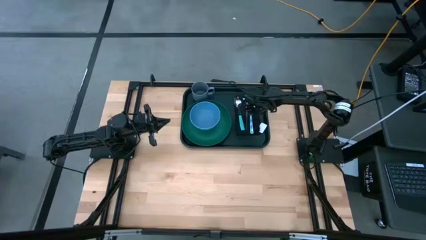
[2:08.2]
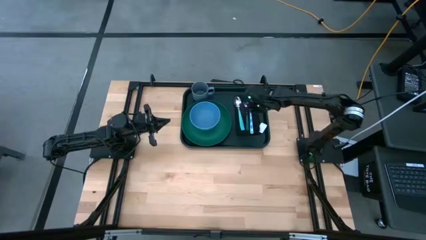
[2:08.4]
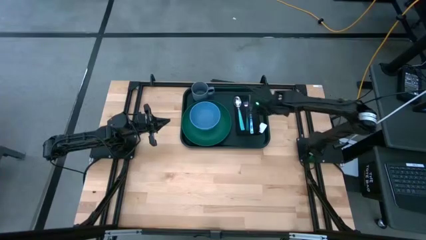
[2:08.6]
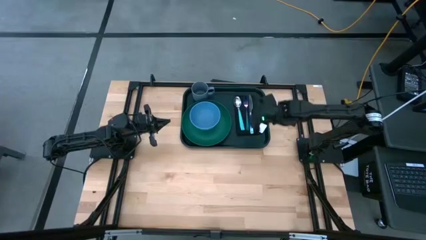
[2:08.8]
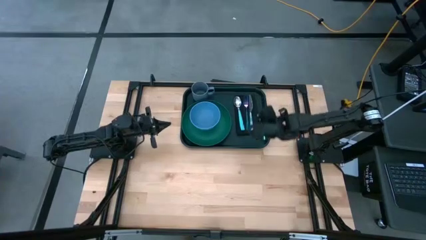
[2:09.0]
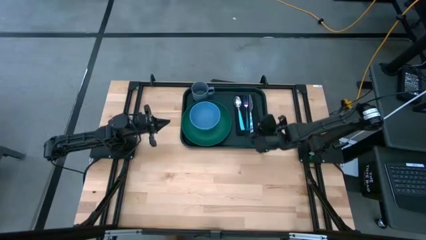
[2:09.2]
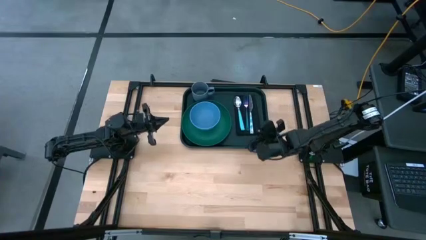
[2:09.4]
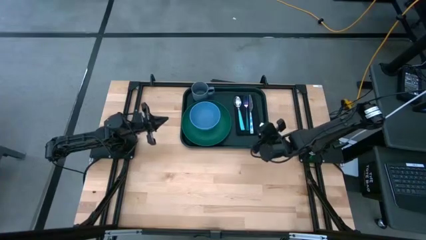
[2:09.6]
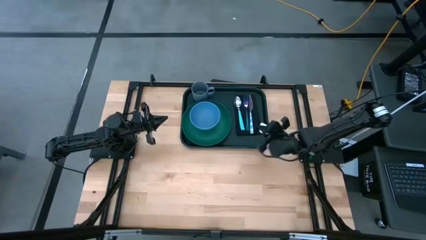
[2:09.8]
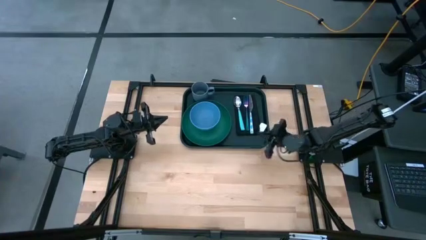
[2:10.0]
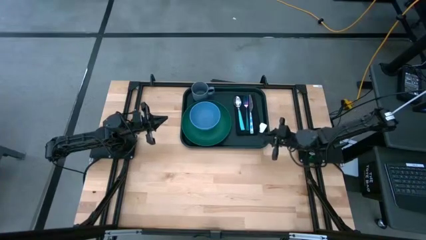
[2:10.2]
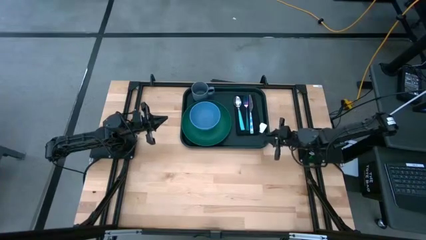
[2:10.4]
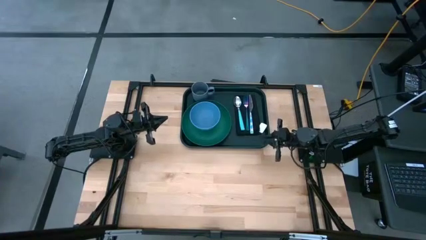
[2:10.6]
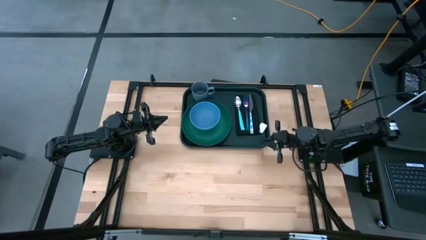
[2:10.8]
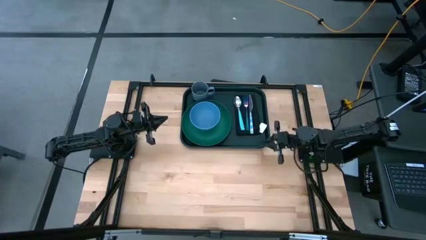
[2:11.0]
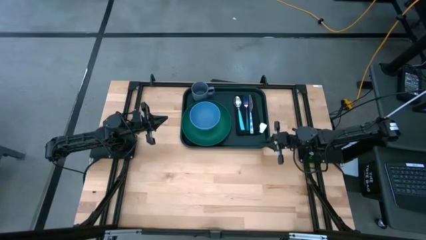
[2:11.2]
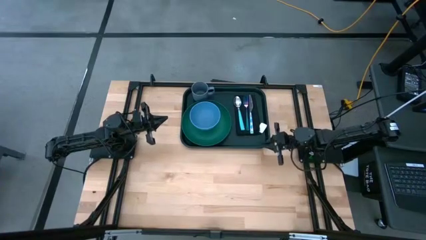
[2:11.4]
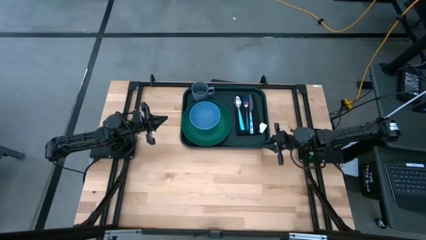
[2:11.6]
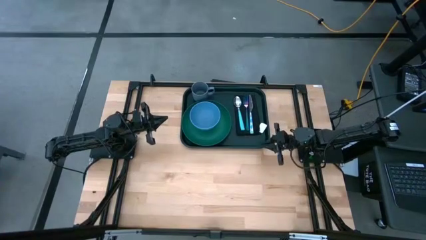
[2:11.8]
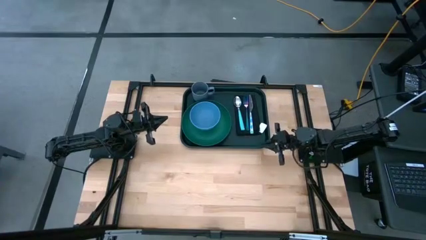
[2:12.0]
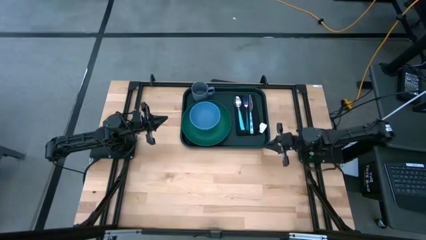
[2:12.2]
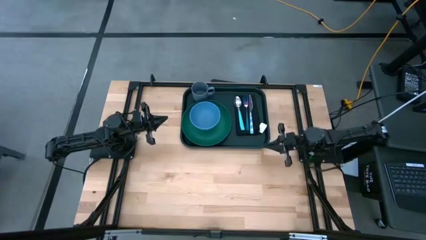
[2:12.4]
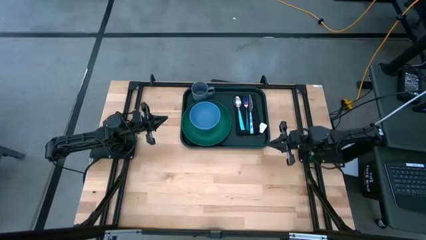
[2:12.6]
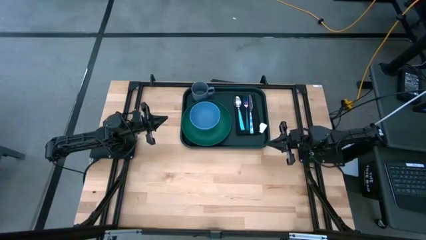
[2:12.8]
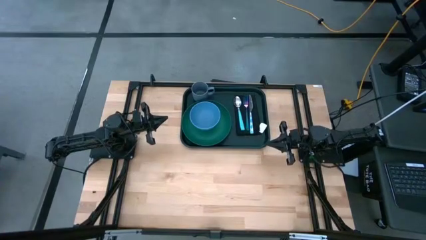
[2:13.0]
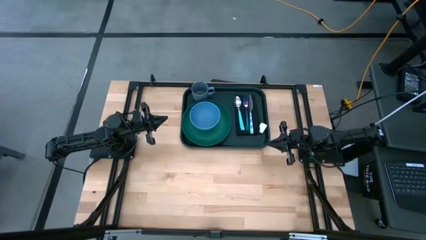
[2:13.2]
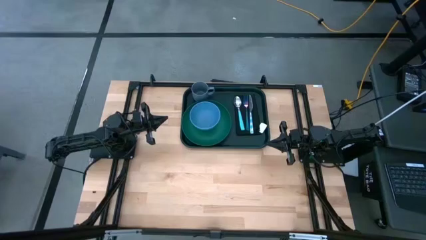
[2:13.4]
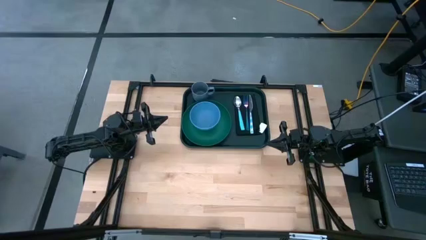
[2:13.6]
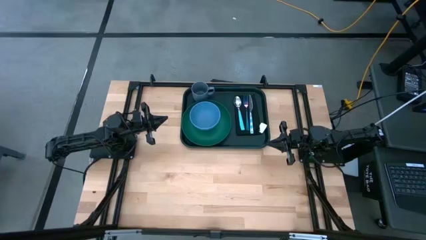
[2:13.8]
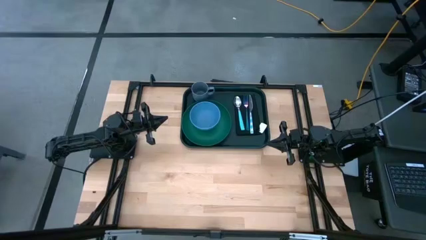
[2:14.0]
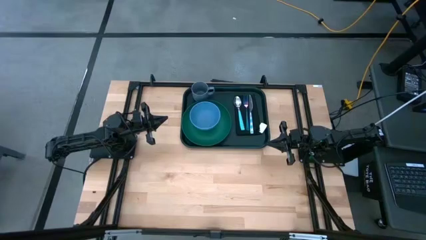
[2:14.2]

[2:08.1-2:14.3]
Task: Set up tray
Return to Home Position

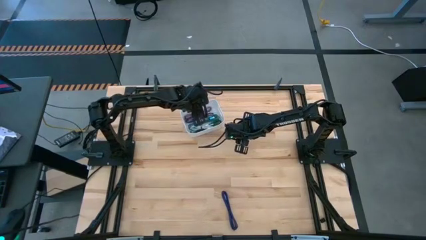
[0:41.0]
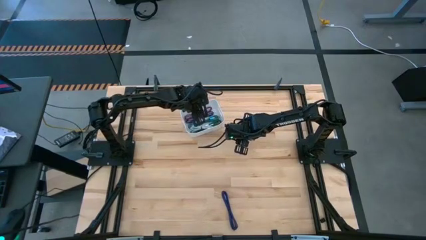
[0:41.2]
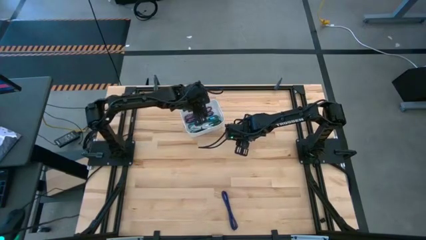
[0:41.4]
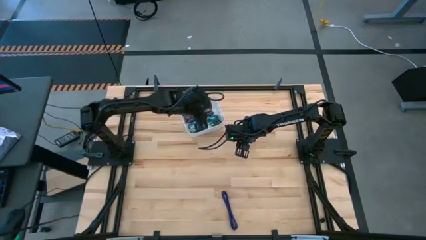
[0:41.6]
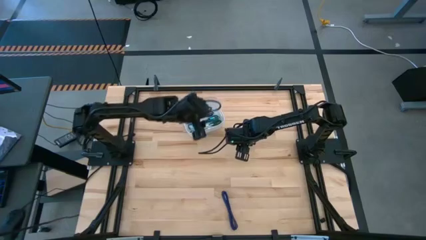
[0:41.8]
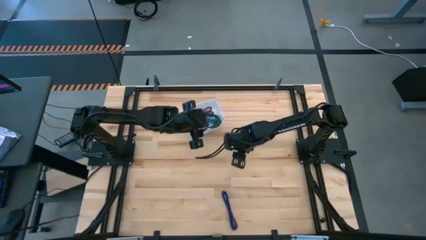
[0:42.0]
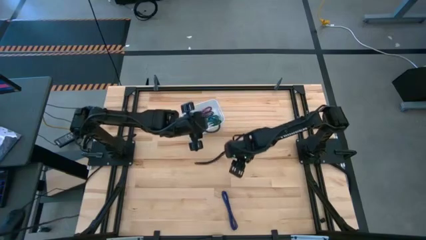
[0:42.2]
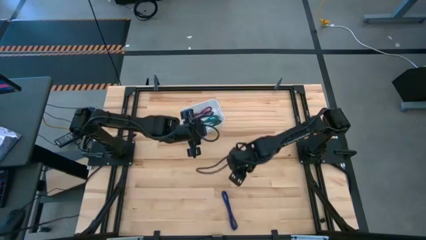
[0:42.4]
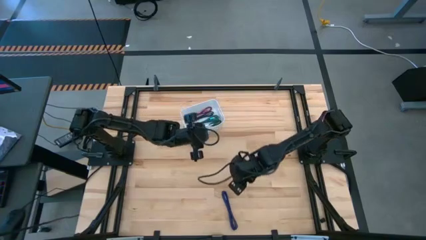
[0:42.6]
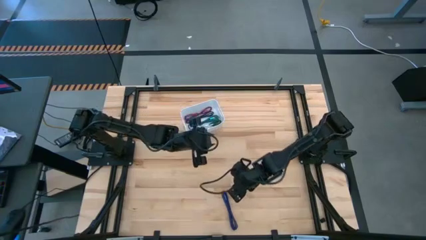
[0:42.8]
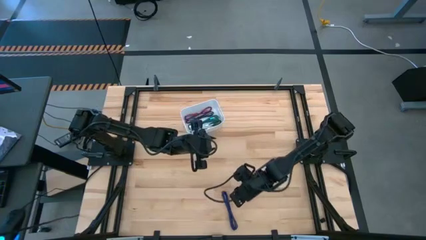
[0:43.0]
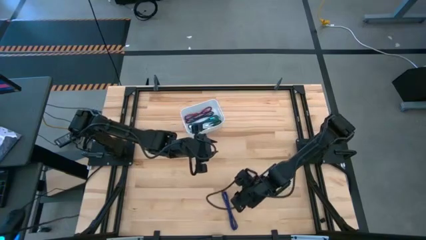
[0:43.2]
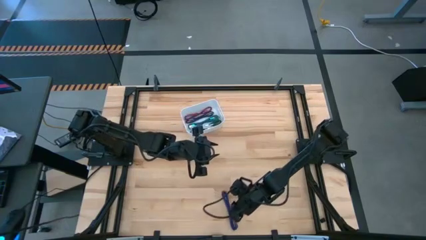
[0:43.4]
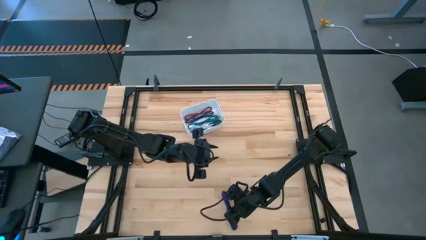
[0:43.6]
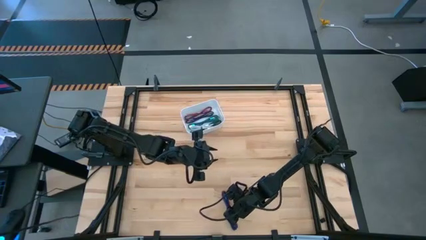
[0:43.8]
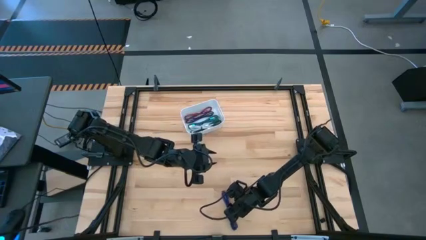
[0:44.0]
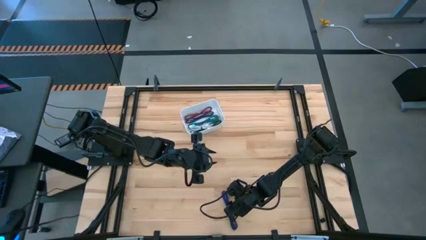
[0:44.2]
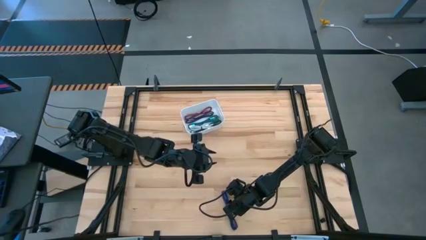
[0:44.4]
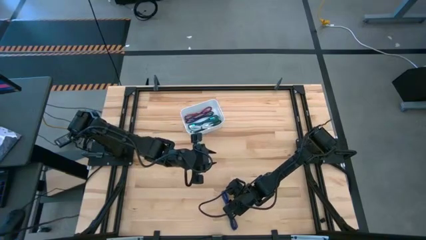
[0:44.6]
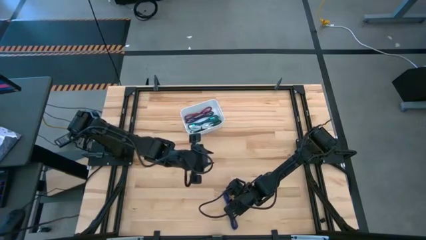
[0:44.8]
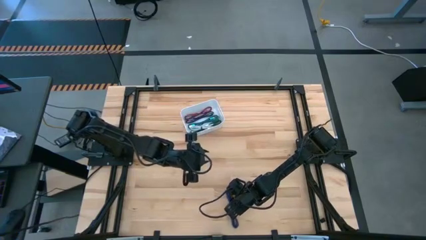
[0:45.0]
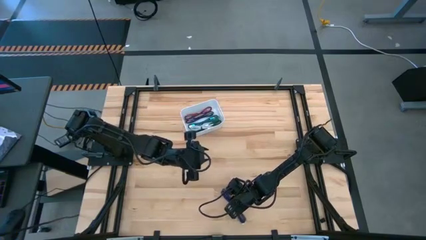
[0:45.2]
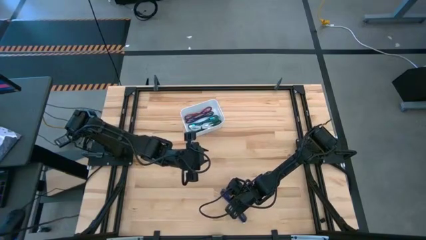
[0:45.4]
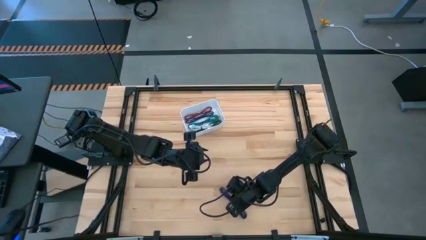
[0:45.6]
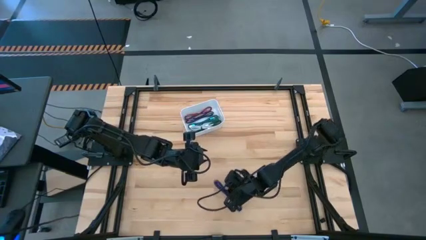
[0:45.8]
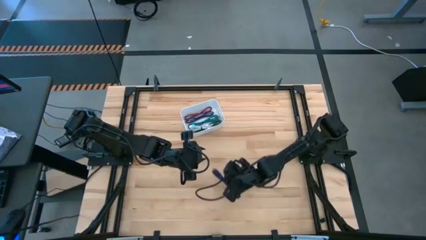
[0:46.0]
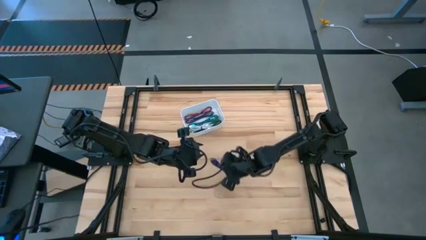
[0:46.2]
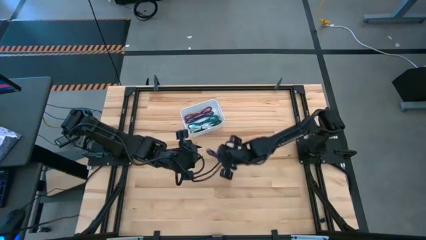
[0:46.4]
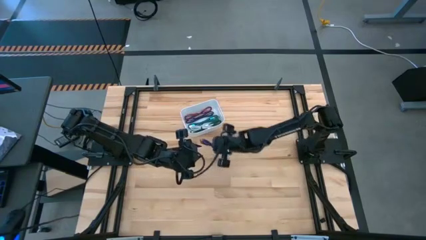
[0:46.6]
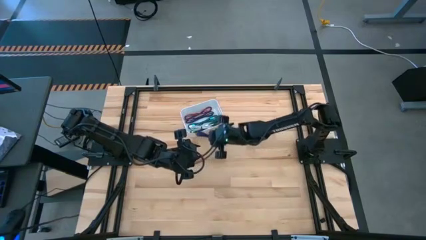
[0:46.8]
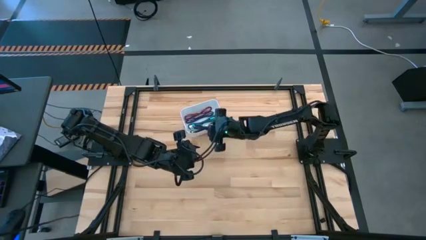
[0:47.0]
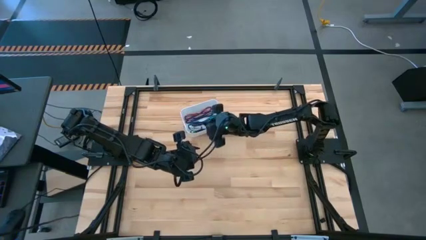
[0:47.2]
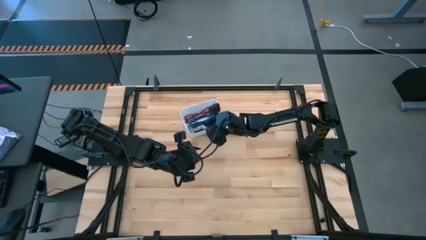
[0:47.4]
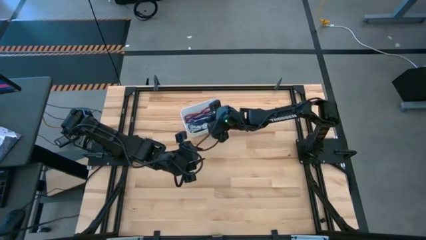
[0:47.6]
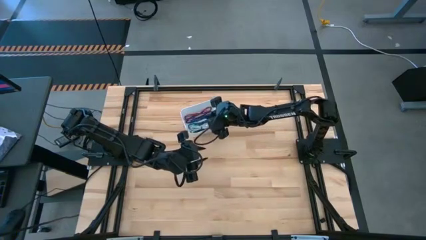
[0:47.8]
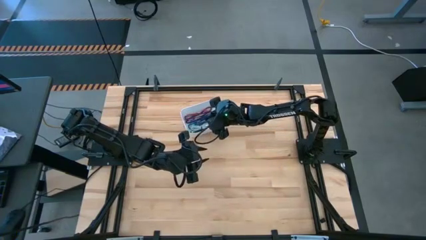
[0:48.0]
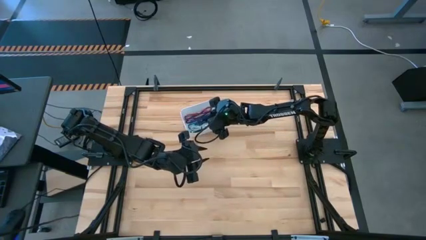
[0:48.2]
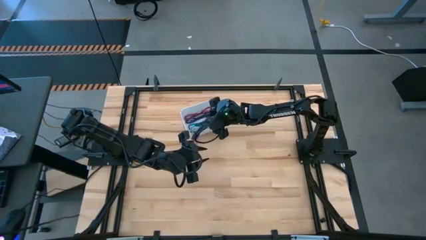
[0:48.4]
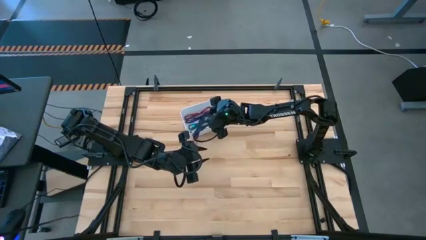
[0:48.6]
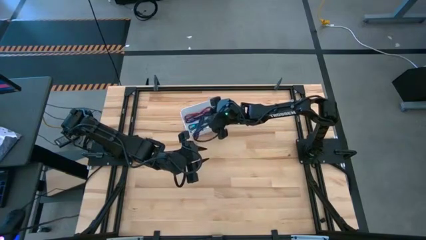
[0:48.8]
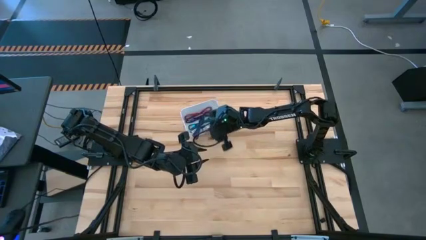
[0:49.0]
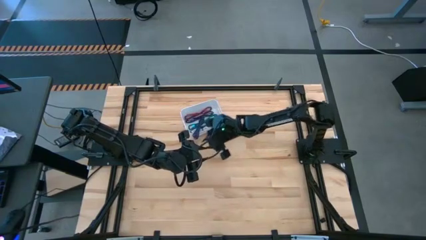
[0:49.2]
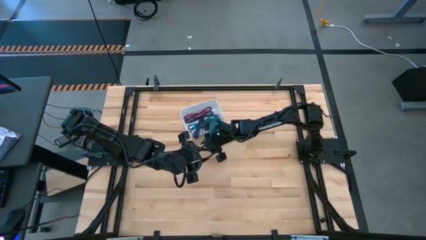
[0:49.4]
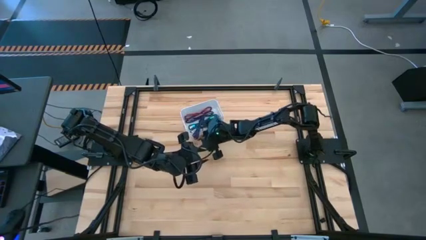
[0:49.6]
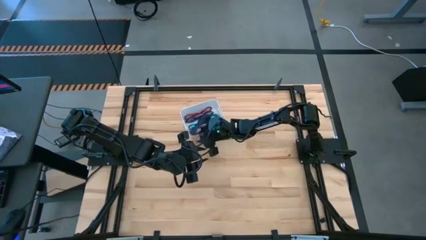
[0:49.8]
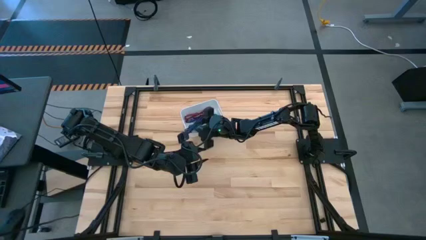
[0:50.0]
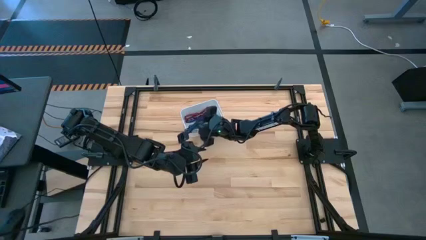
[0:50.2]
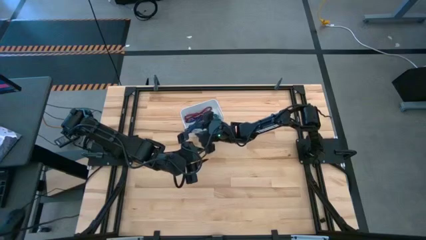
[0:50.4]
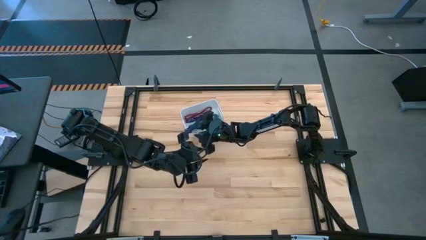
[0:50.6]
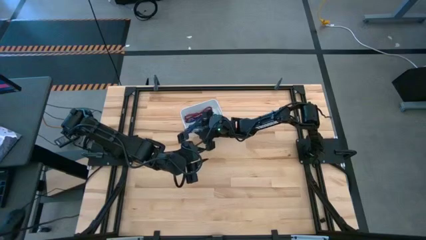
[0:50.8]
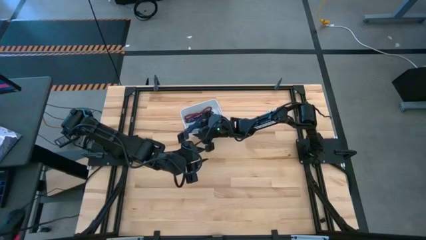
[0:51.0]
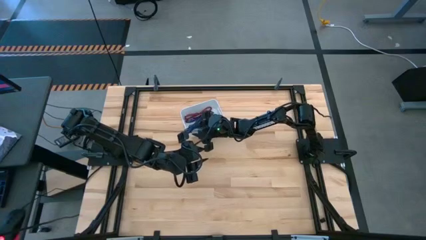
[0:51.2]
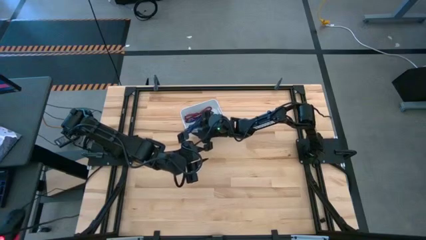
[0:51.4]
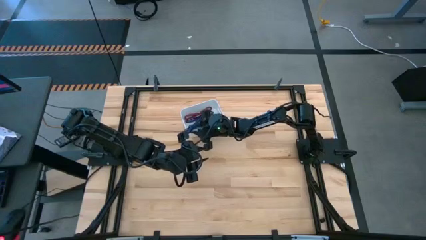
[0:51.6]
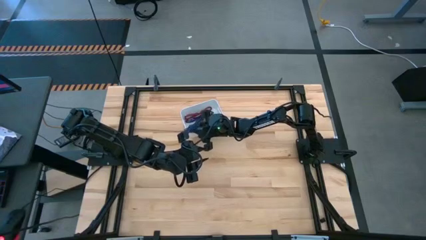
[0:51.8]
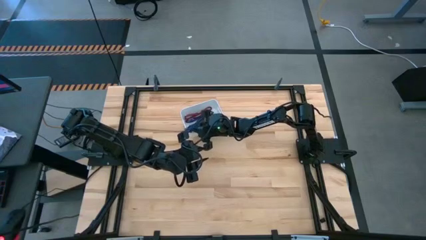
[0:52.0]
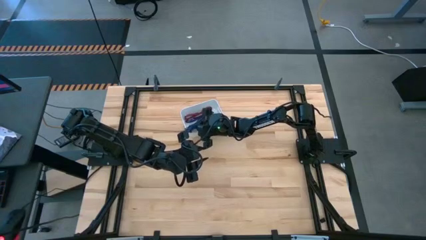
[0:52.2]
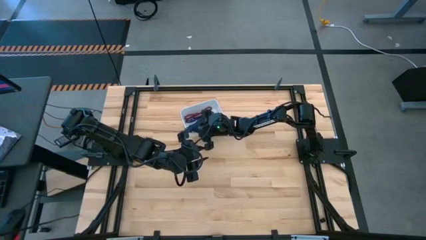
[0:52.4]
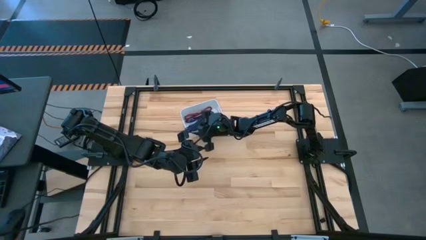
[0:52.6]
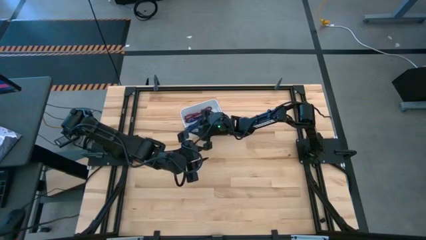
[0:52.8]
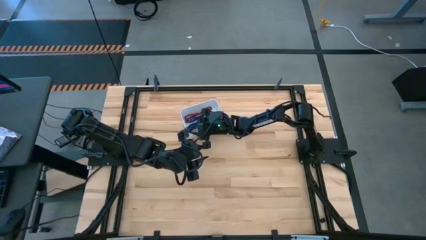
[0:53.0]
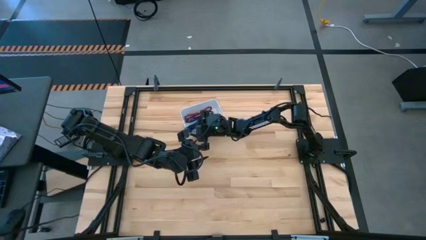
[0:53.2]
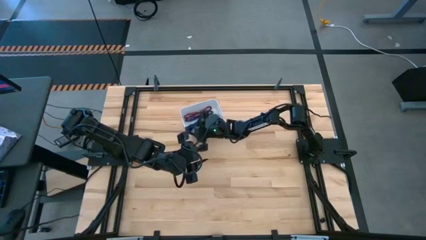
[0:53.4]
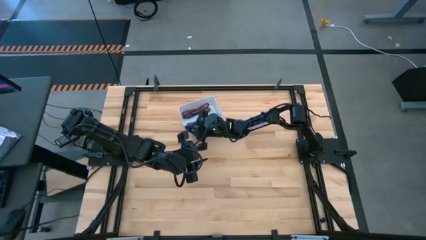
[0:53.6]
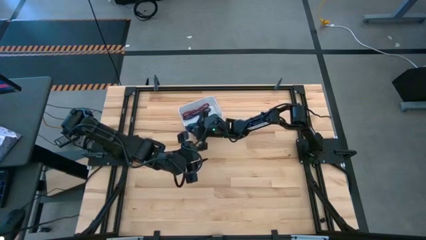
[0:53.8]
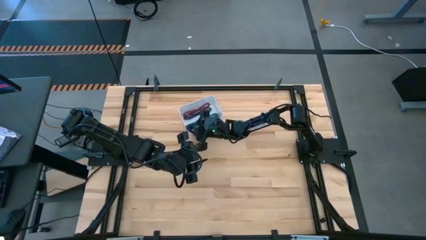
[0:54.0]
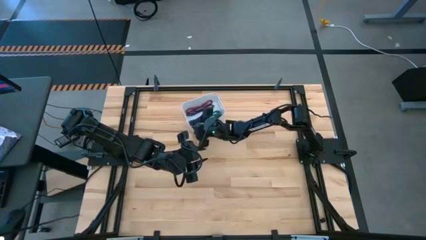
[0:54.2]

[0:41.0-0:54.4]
Task: Pick and place USB-C Cables
Put the purple charger cable into the white bin
